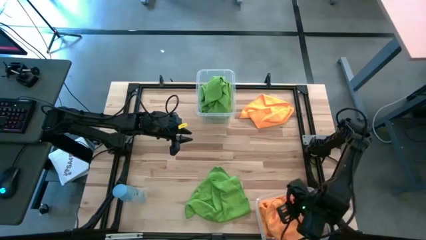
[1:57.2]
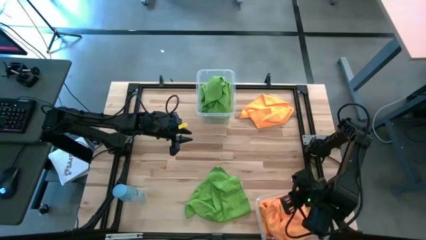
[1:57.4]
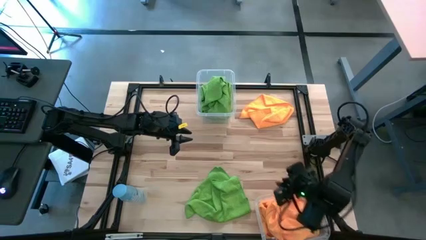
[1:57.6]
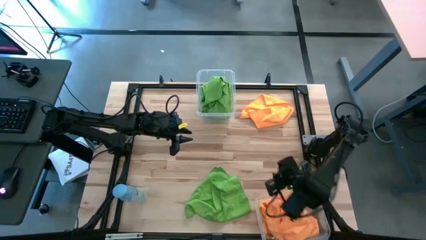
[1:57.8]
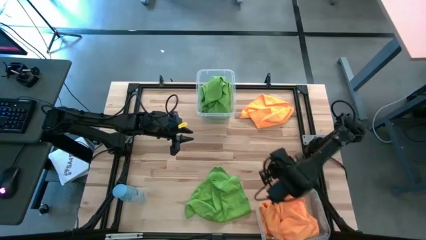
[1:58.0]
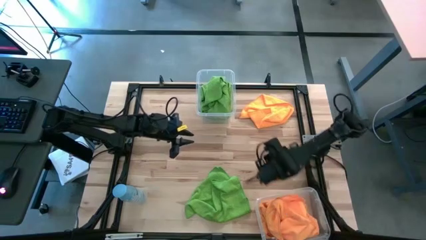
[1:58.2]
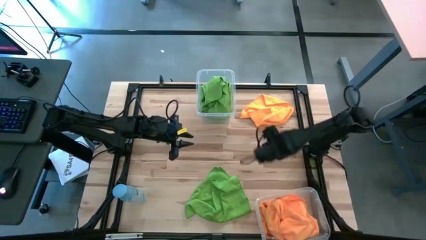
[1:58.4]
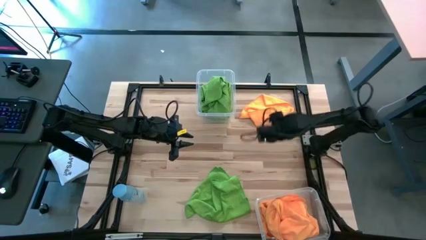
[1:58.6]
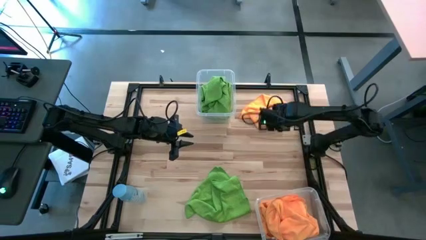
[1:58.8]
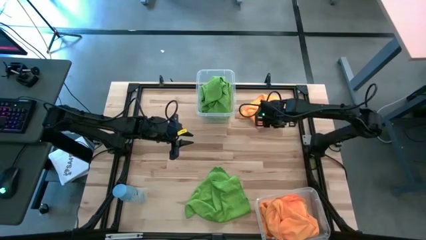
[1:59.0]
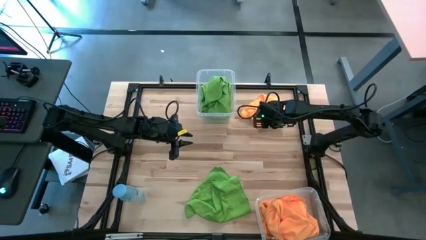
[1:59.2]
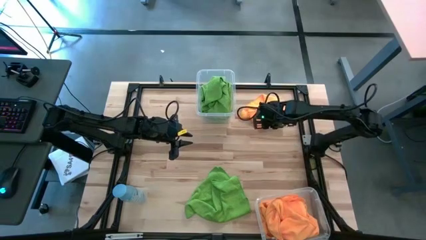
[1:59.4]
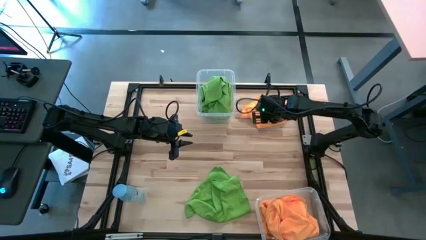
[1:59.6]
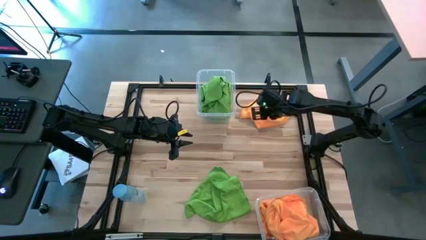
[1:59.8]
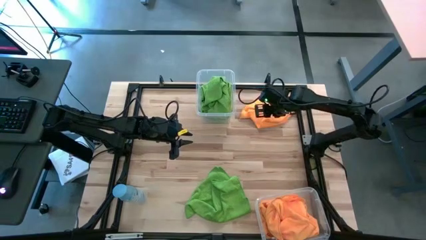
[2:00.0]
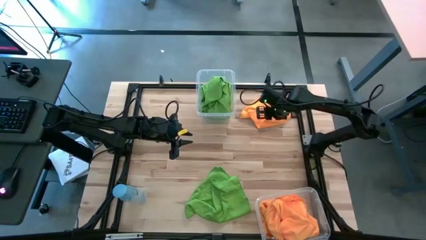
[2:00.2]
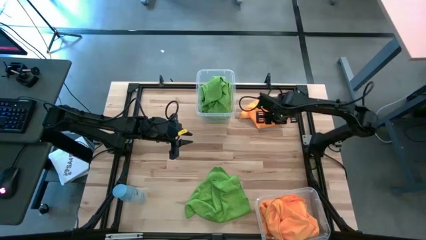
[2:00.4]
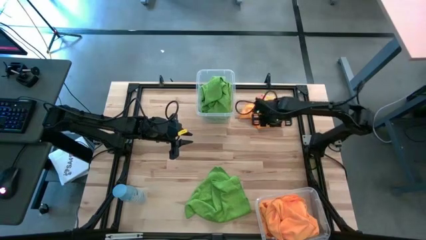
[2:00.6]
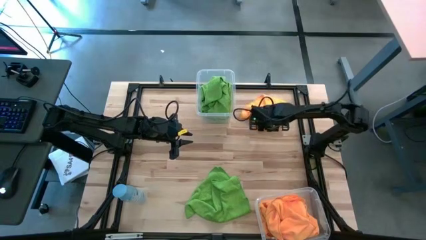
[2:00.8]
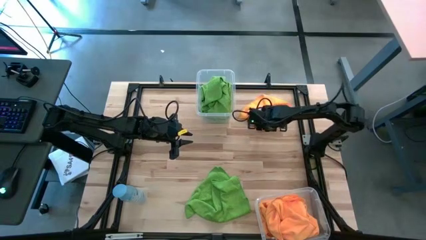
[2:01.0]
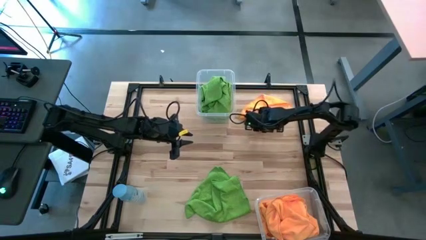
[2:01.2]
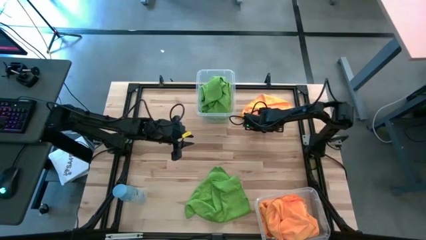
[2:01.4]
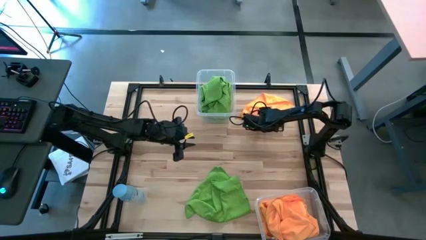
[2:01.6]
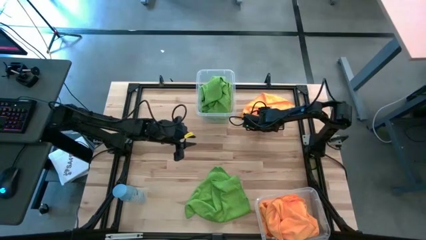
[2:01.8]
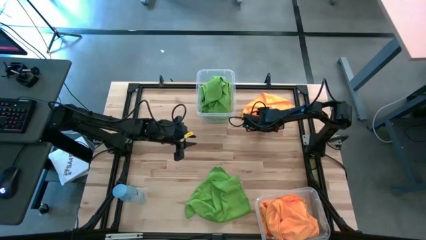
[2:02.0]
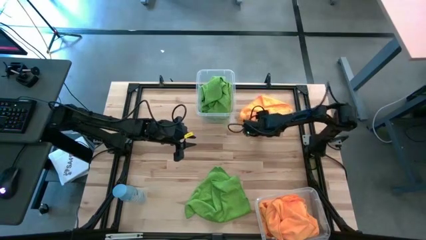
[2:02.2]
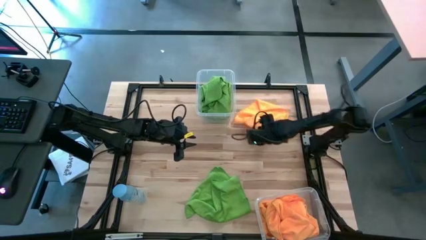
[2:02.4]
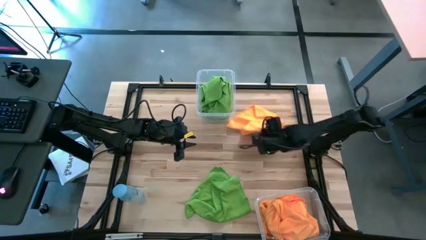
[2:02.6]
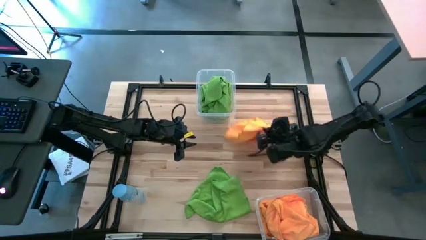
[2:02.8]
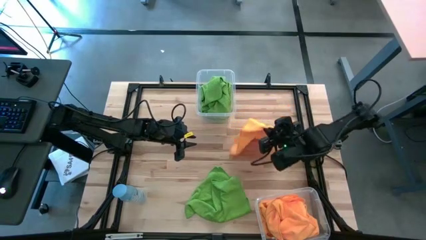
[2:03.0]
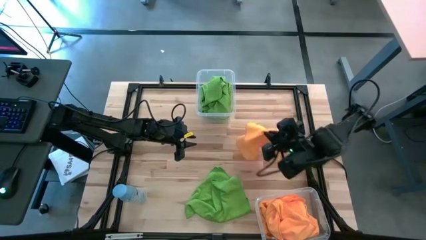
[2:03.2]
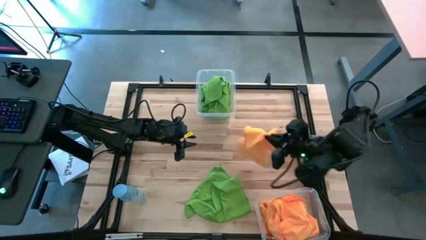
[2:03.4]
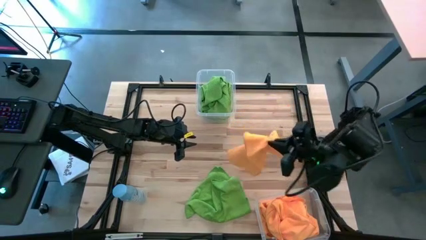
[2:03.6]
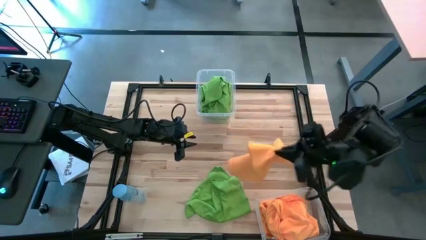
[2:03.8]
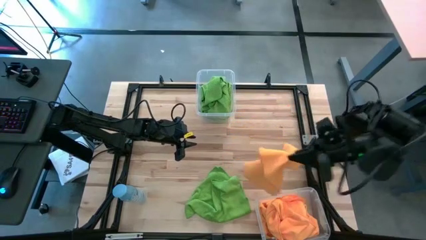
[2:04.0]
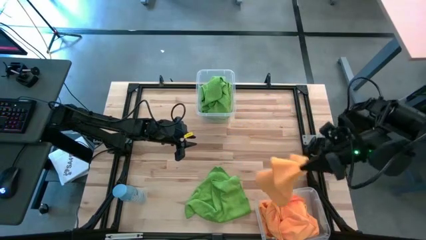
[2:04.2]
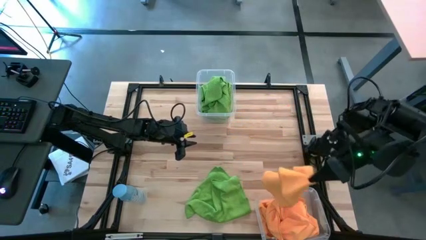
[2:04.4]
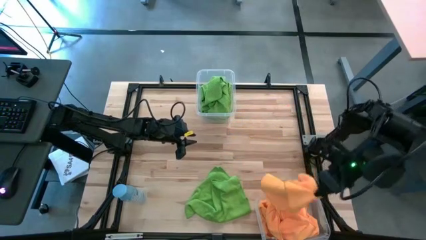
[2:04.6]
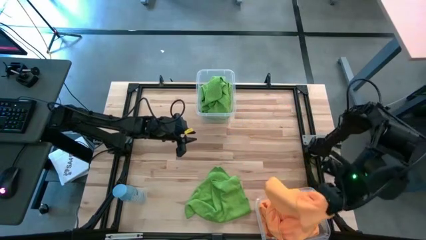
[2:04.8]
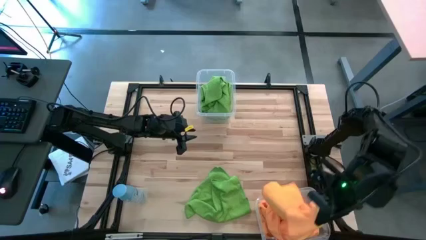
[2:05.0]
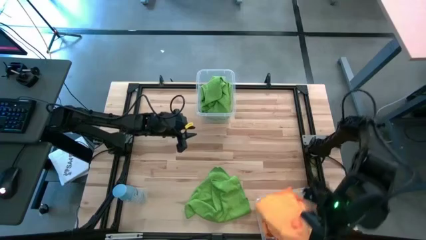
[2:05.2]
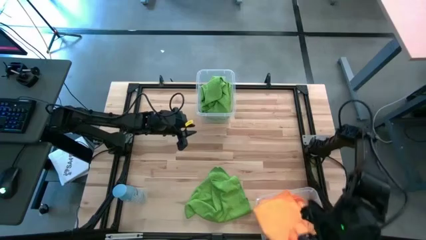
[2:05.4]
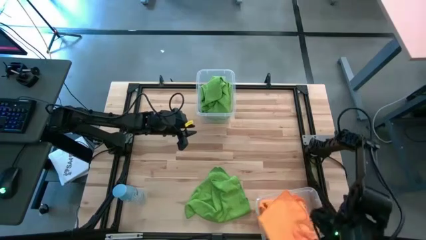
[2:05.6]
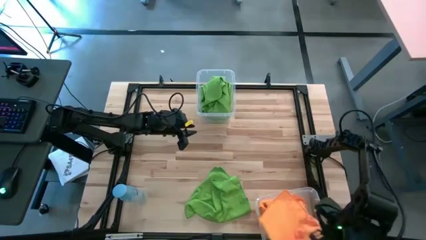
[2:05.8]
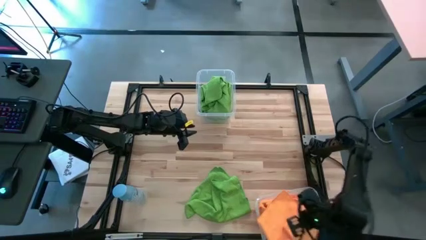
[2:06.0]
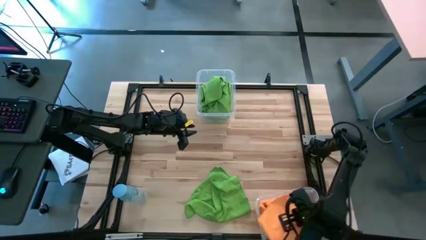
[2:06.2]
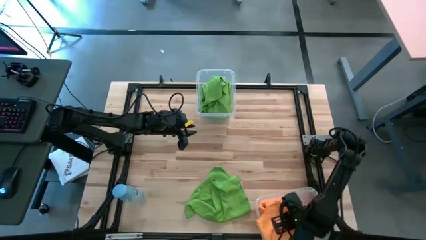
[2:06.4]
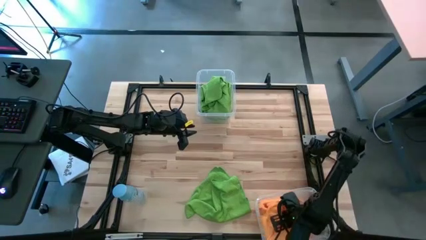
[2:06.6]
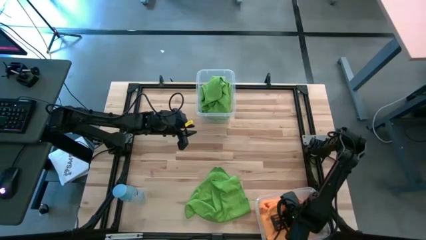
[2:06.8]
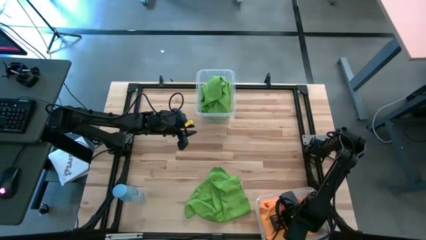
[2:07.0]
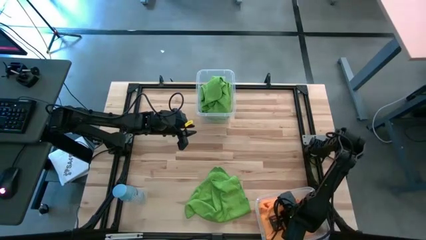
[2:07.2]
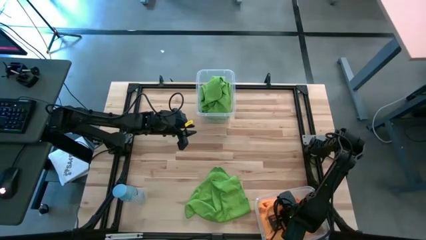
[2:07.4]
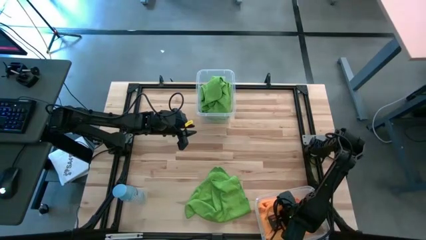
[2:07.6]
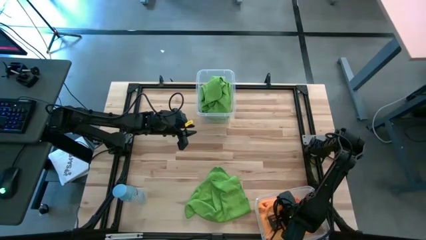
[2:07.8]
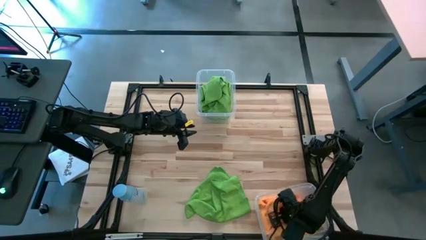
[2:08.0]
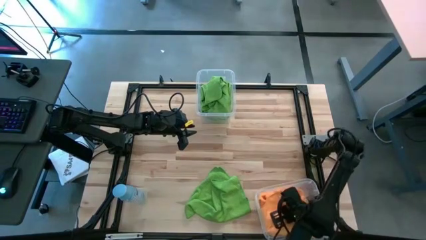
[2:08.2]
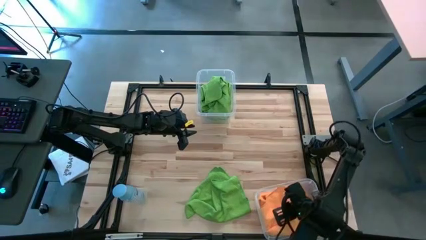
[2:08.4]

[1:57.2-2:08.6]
Task: Sort microfiber towel by color & place in baskets
Put the orange microfiber towel into the bottom transparent bin

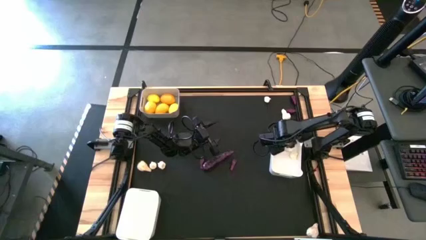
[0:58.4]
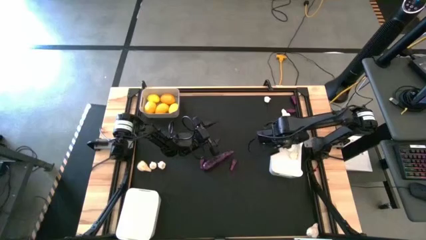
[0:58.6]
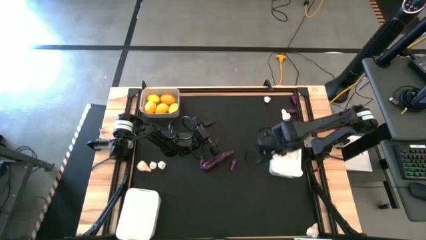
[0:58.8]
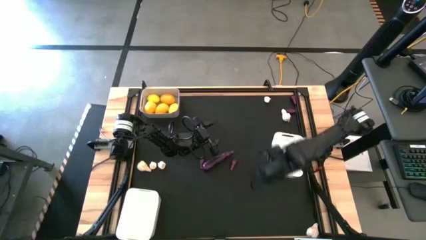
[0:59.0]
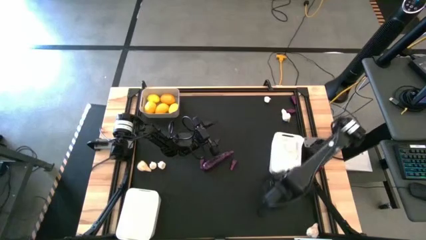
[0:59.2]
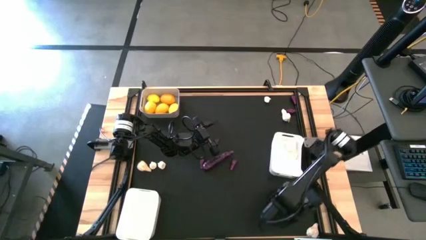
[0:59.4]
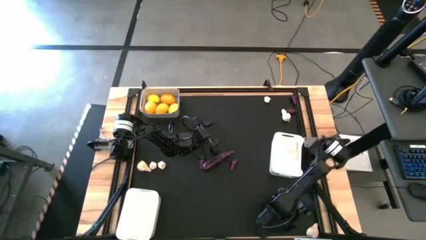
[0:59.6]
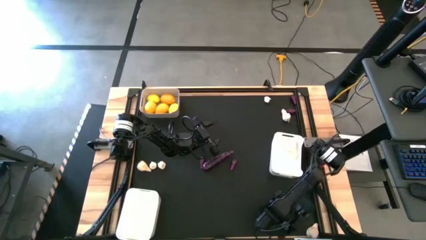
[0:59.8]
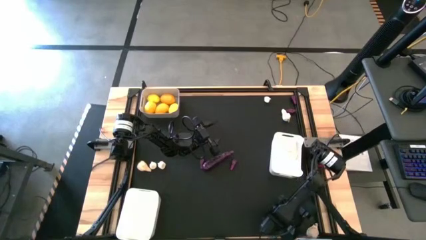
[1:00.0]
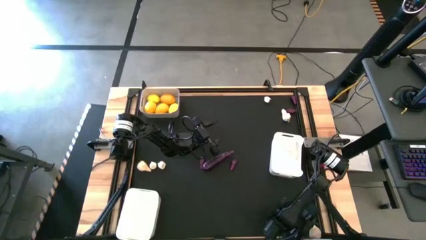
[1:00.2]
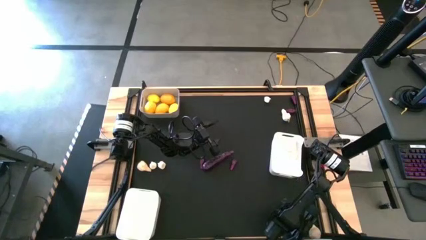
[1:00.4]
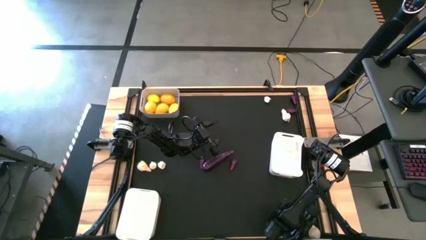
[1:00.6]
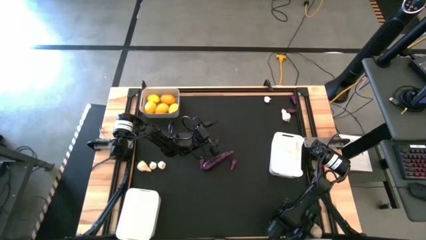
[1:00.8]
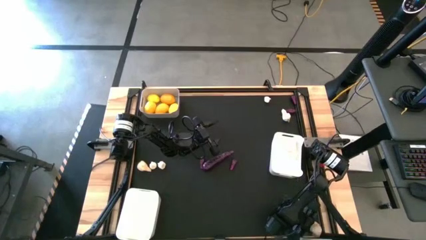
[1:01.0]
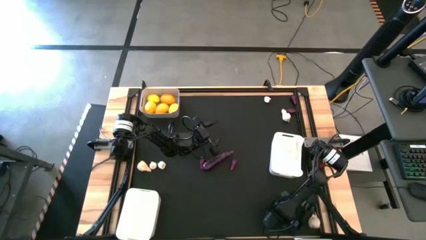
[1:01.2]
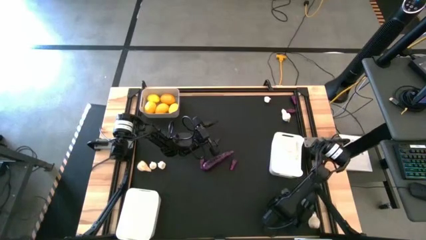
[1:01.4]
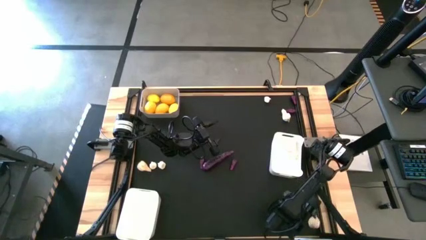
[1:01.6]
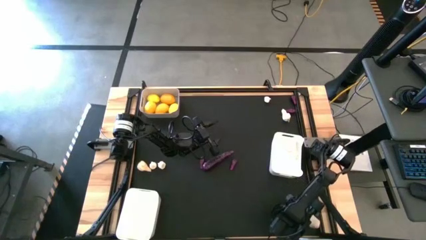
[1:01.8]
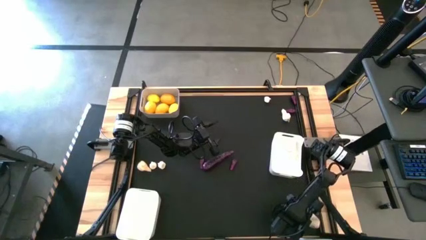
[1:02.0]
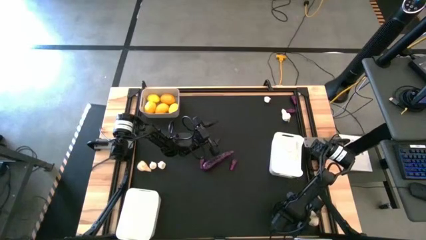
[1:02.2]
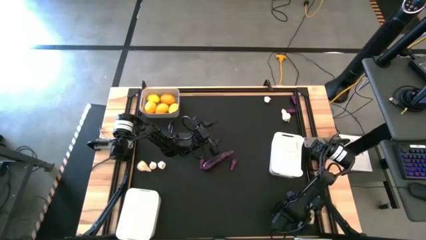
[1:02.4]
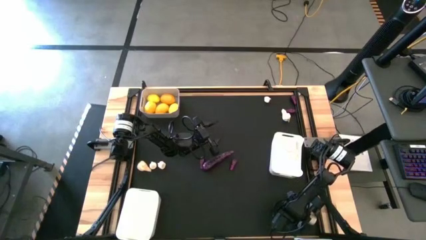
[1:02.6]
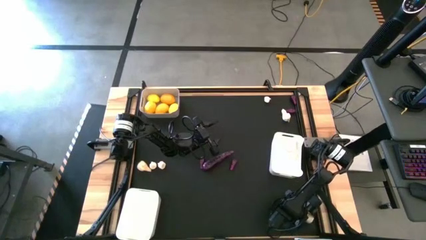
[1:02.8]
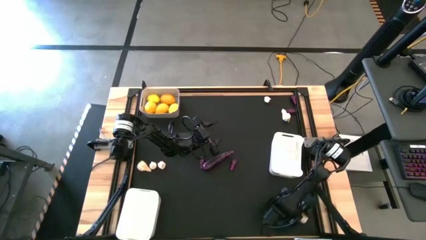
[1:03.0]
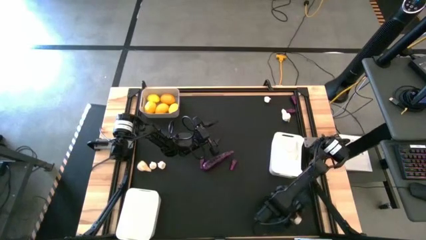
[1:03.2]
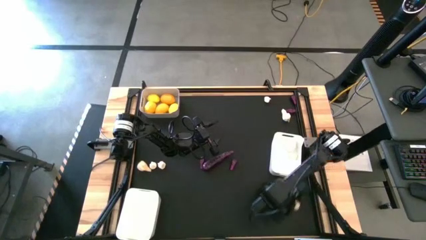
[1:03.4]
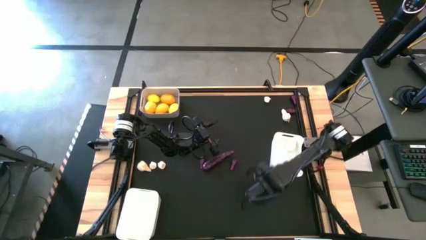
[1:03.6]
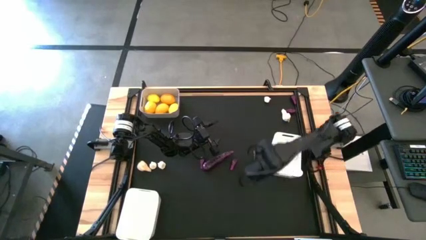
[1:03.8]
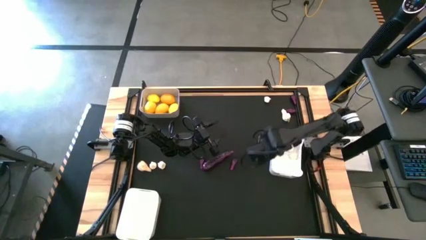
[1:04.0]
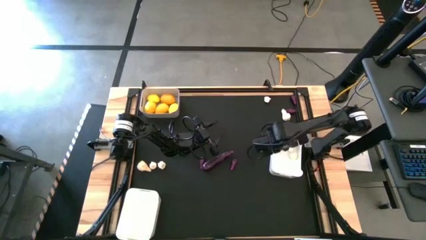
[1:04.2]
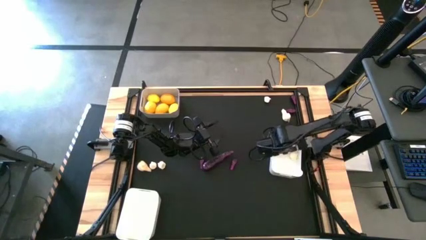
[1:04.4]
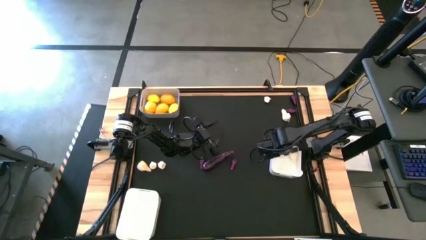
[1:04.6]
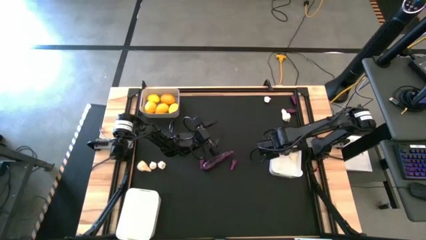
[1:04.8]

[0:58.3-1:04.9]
Task: Sort produce into baskets
Put the bottom right garlic into the middle right white bin
